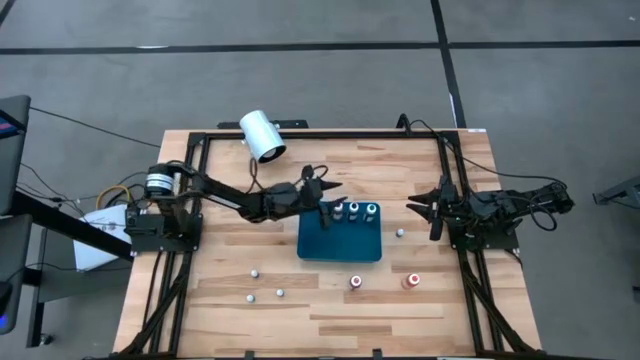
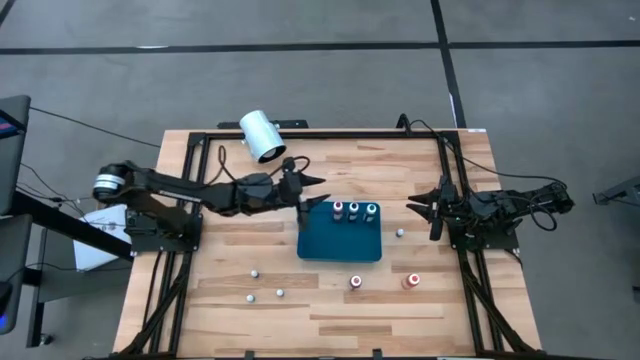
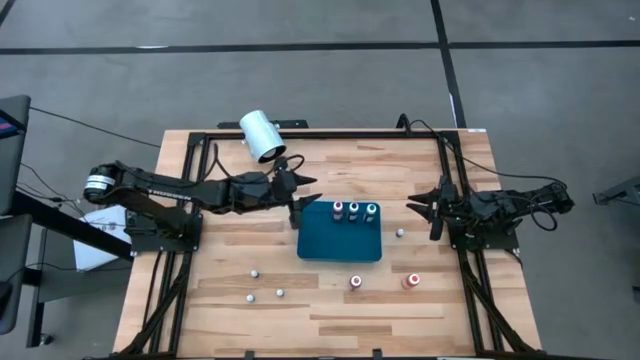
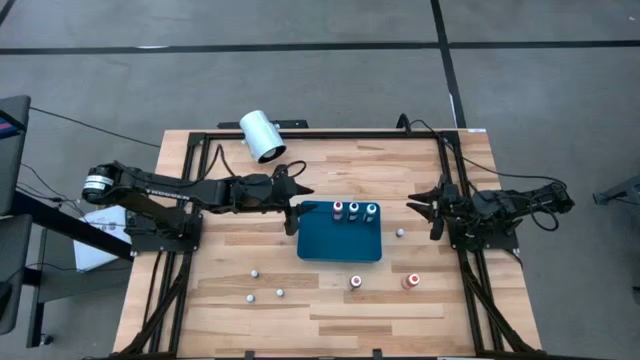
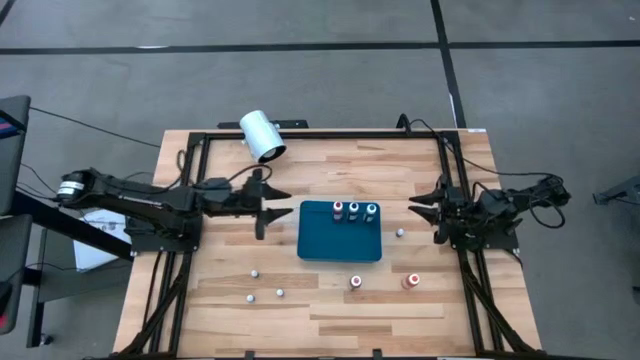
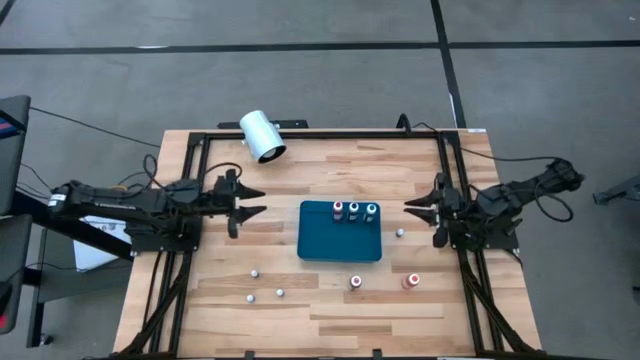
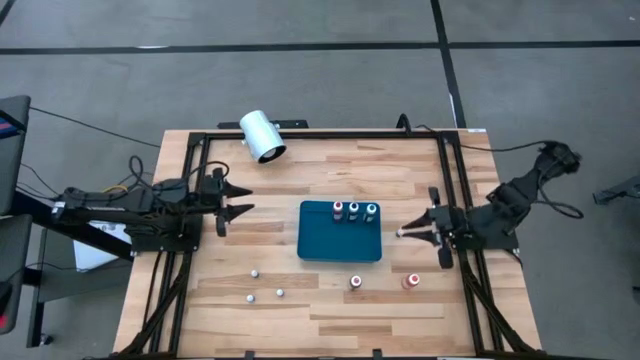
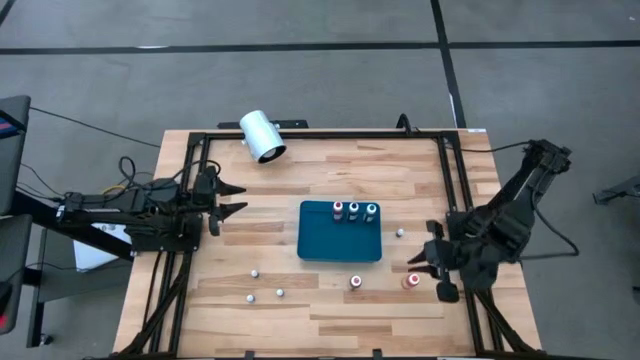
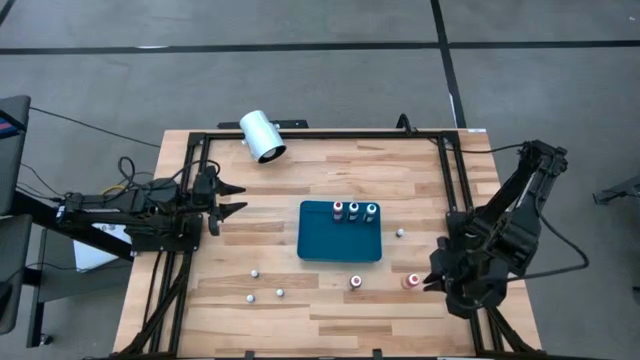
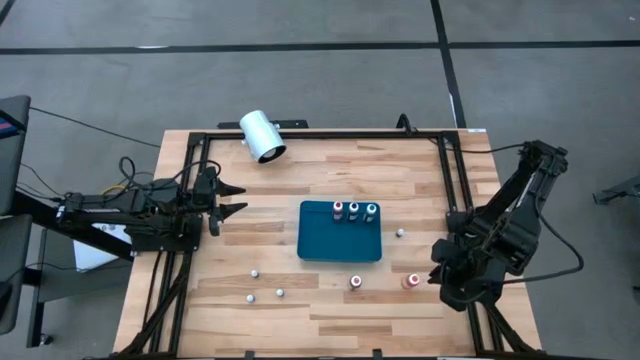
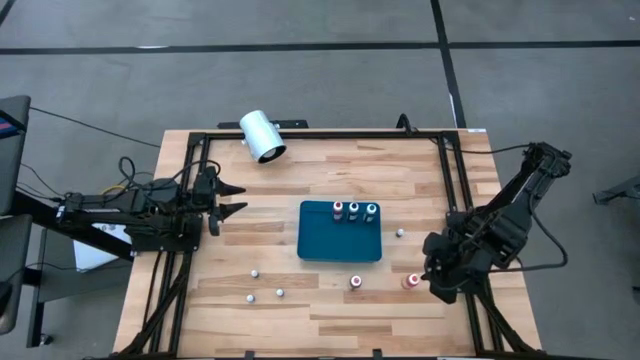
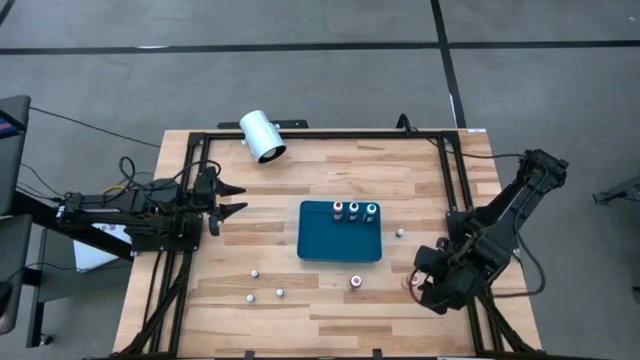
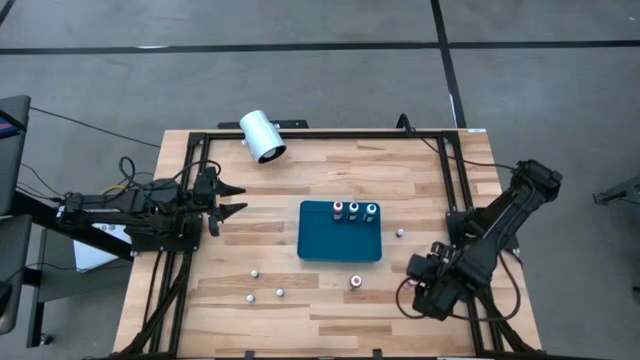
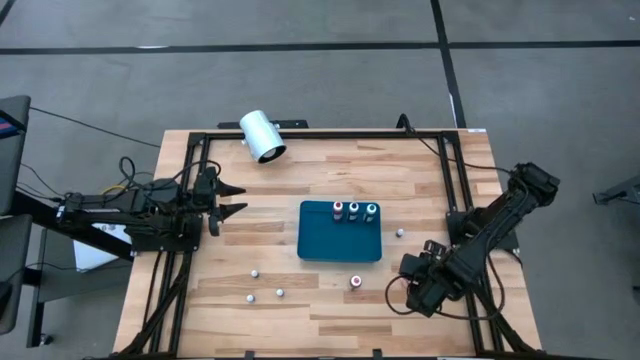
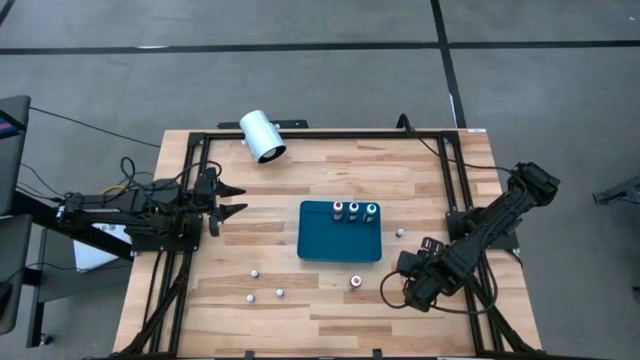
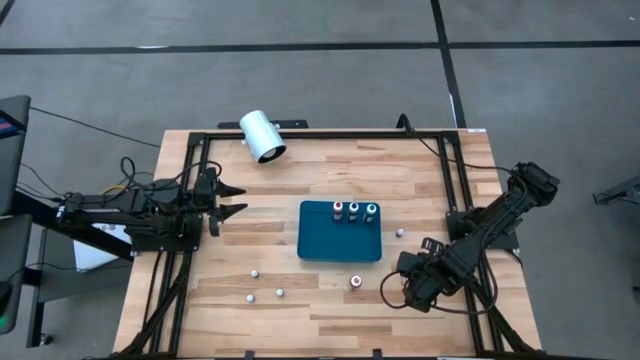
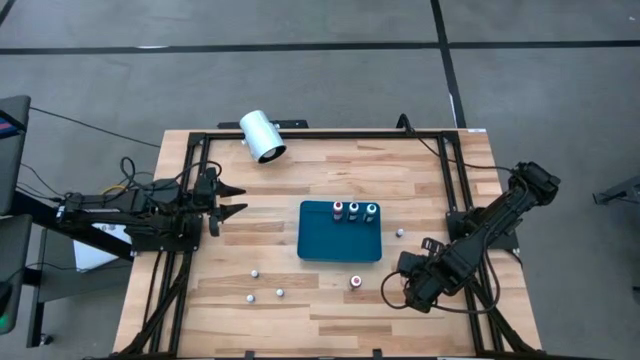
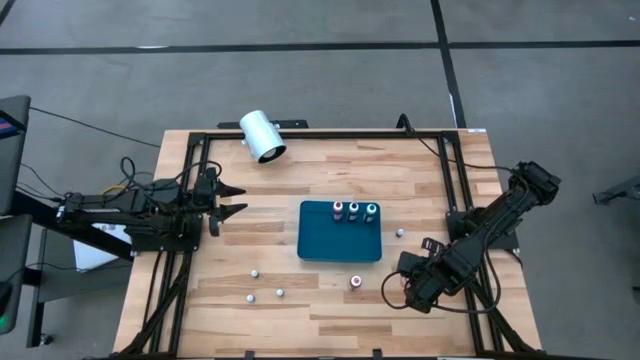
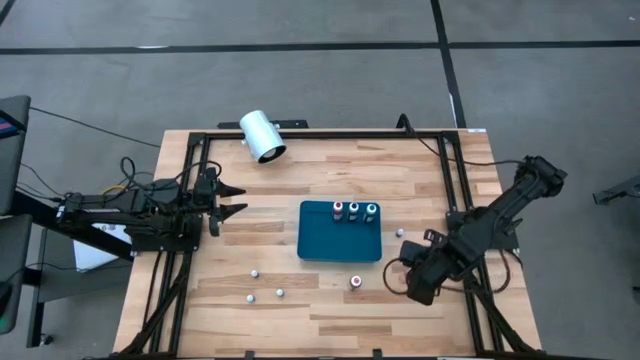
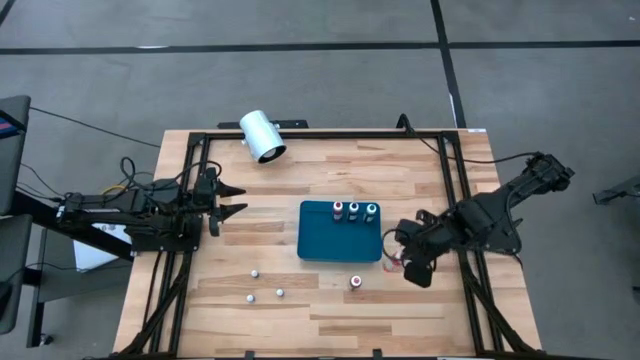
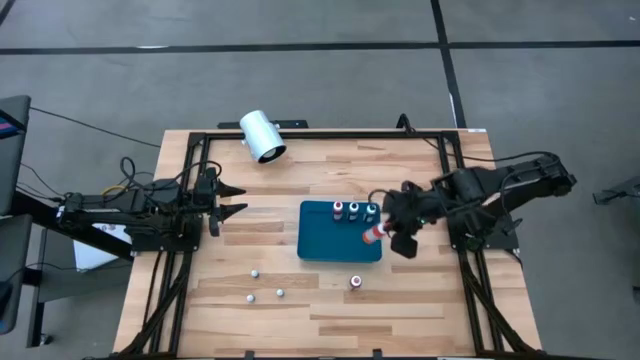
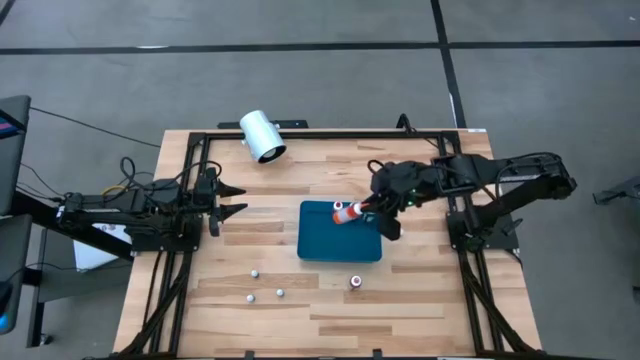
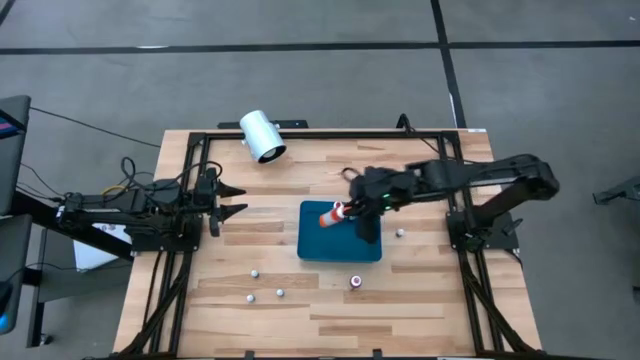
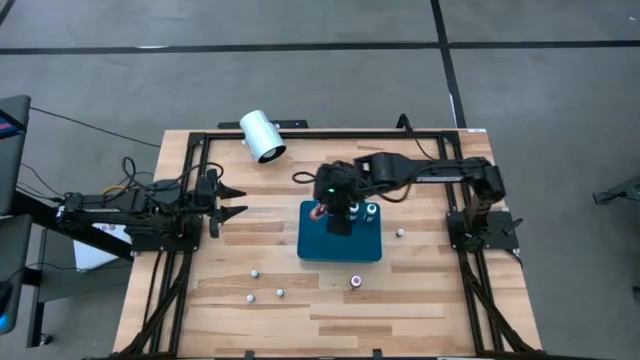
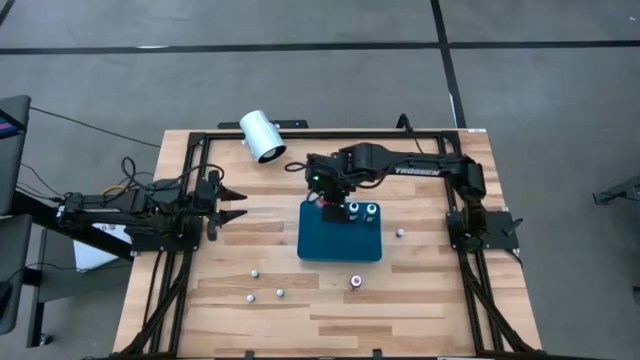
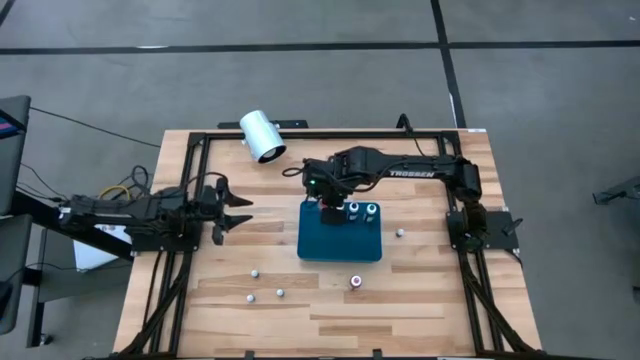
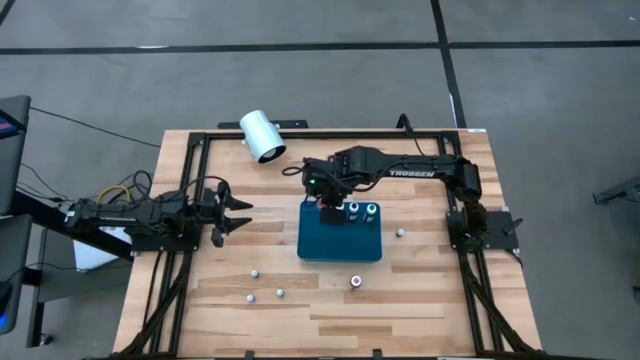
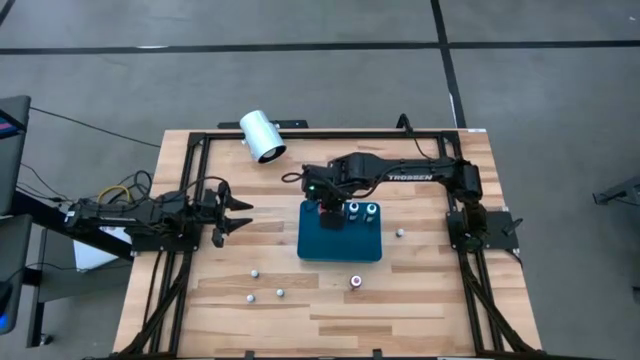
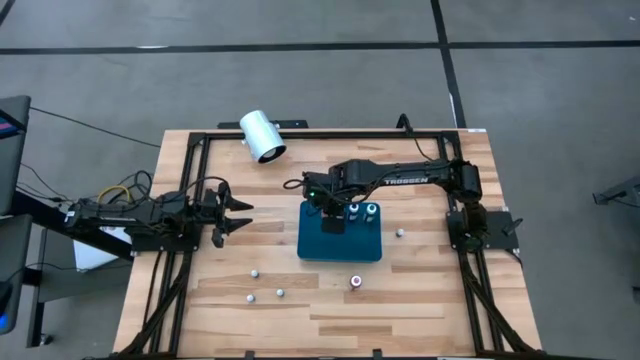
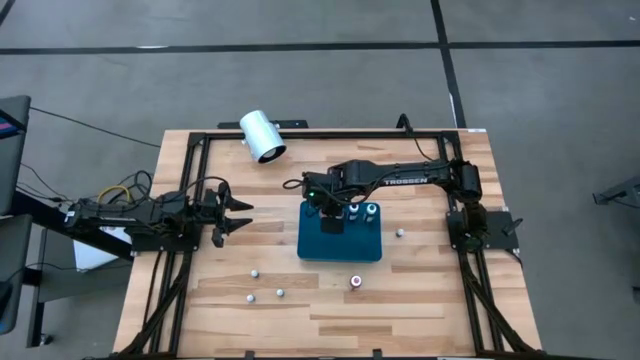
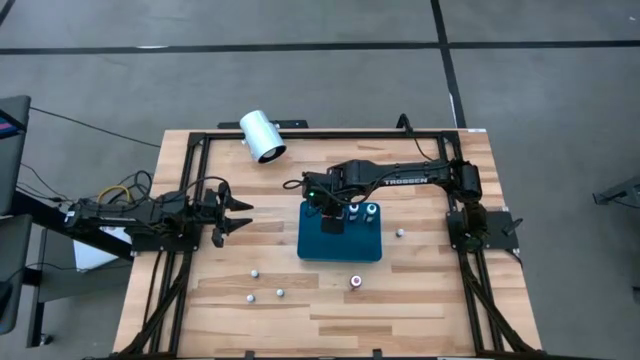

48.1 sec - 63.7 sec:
Task: Pick & Place food coloring
Put the large orange food coloring bottle into the blue bin

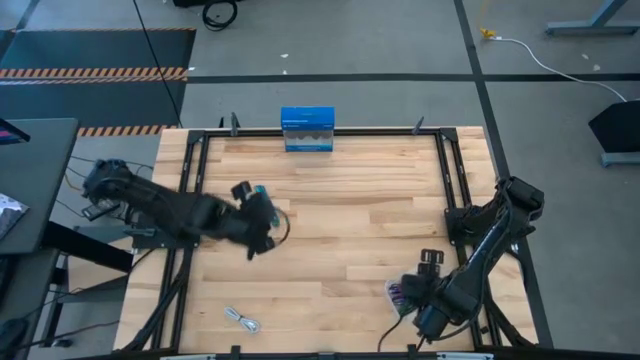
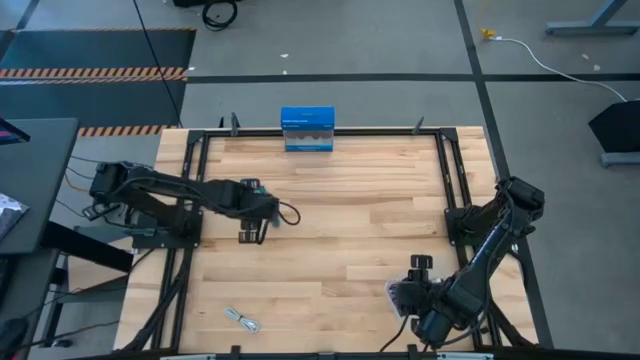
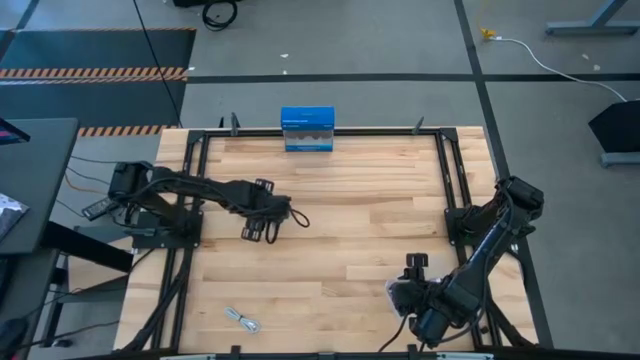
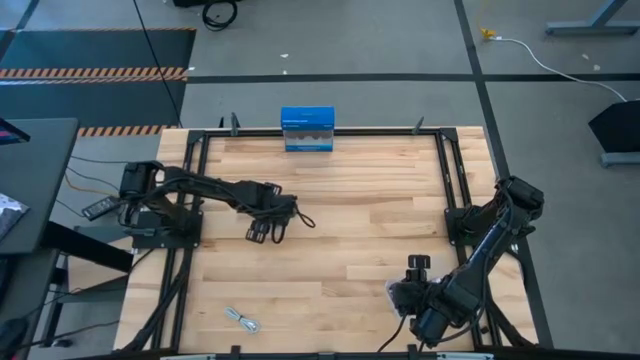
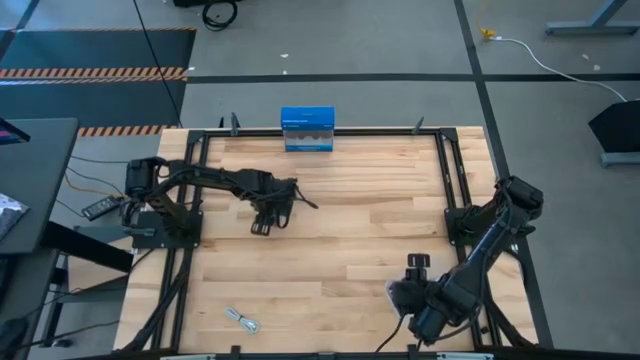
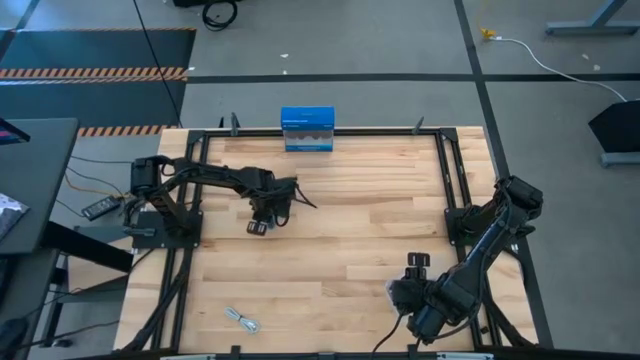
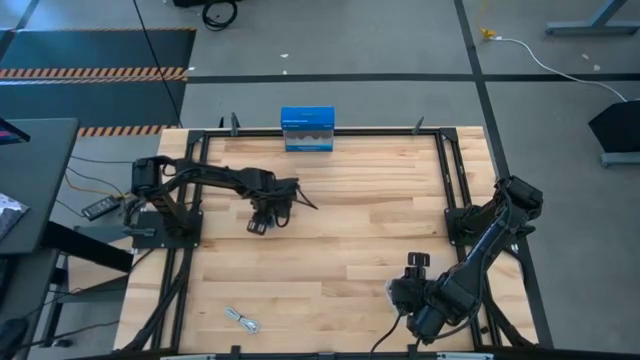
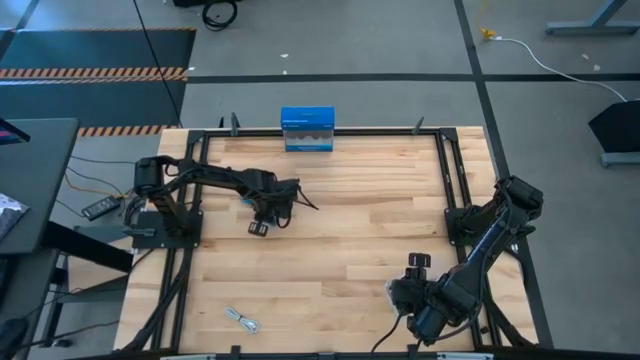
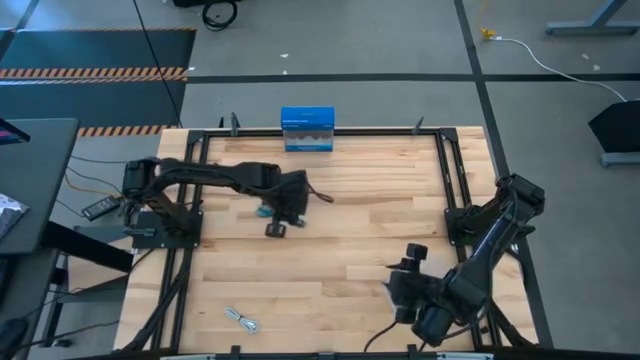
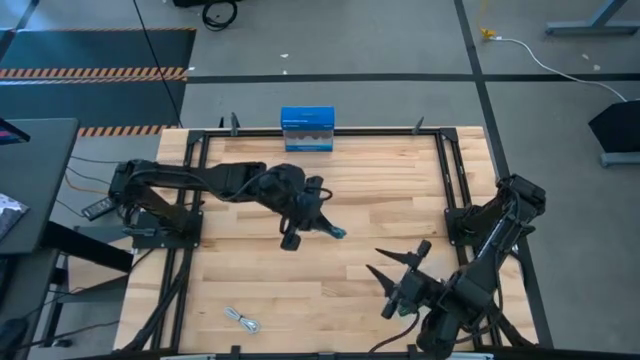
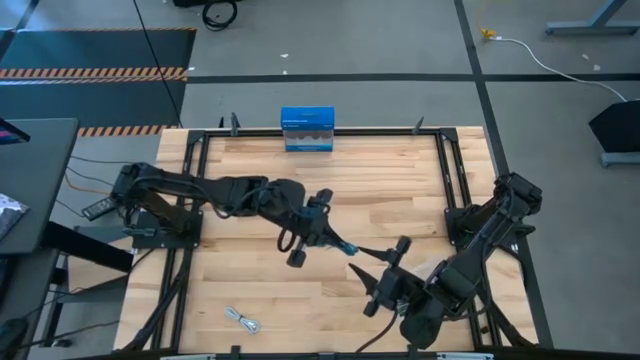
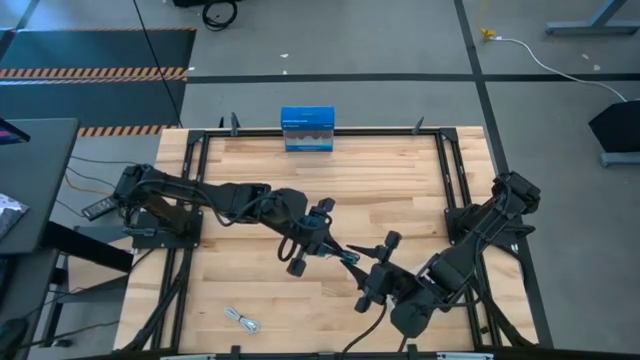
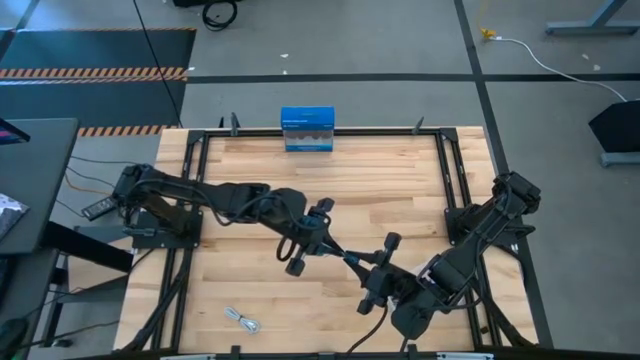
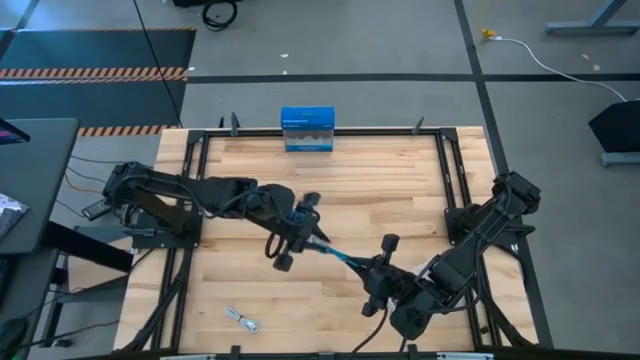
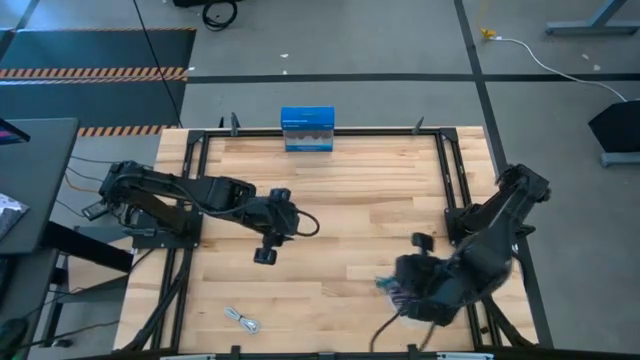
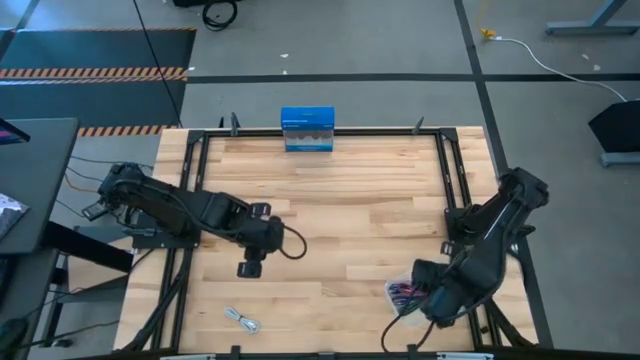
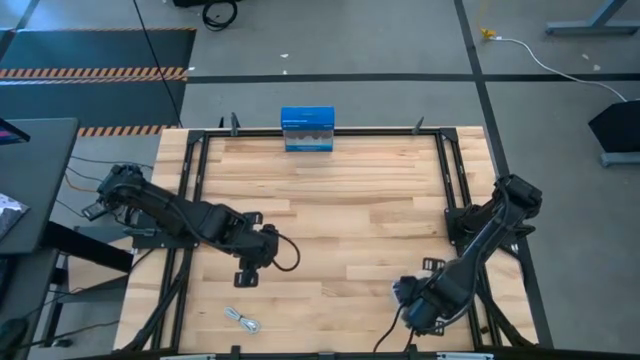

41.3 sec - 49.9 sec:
Task: Pick and place USB-C Cables
Put the light blue charger cable into the transparent bin
